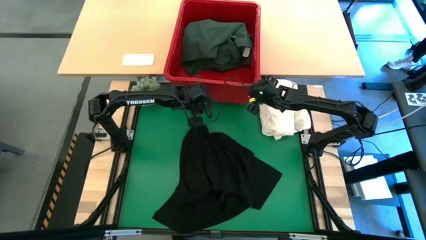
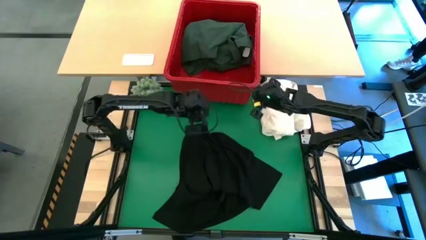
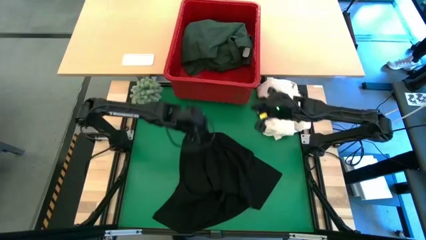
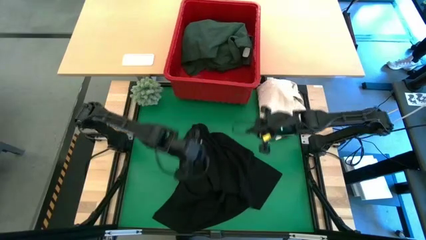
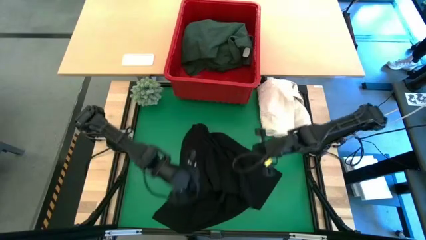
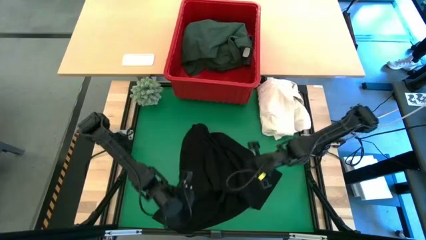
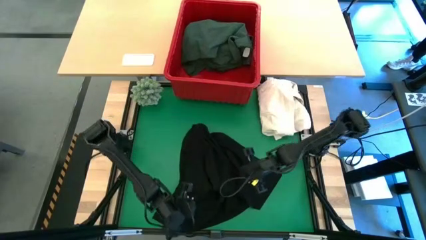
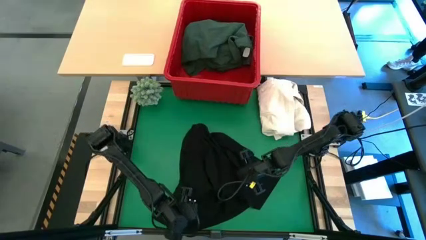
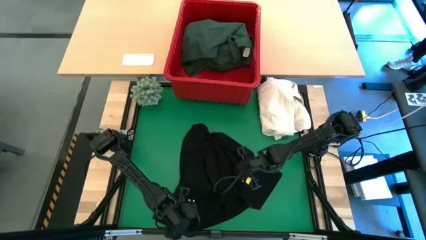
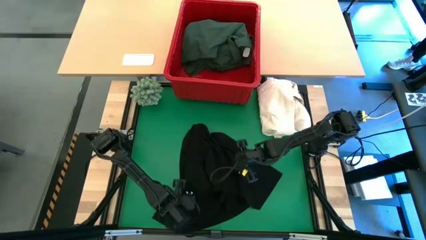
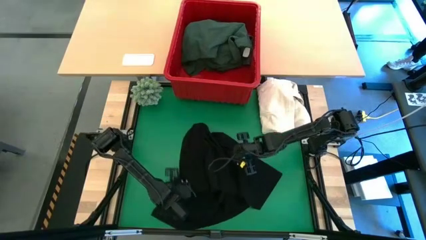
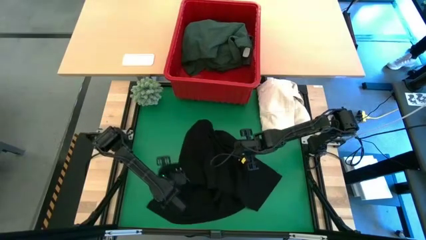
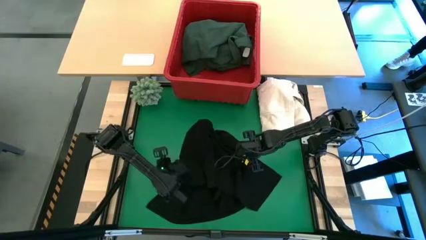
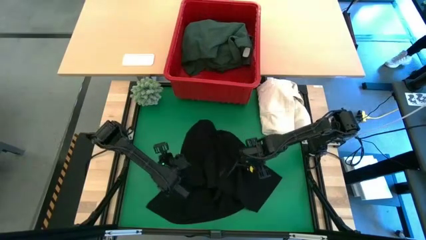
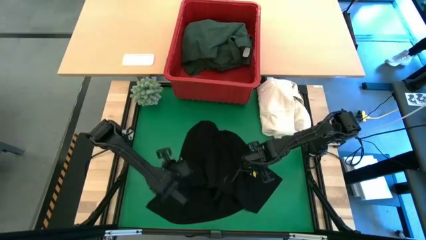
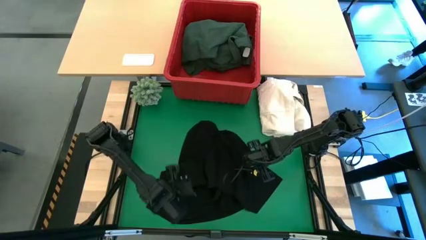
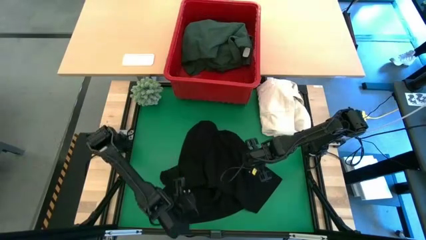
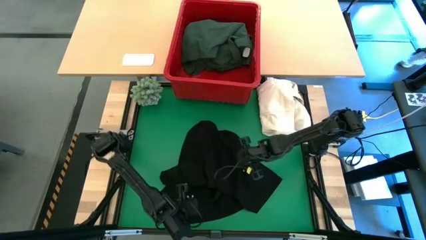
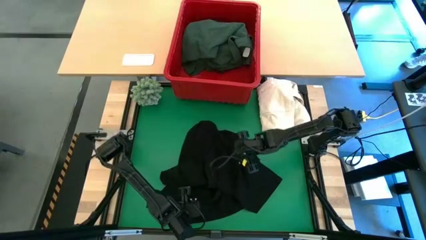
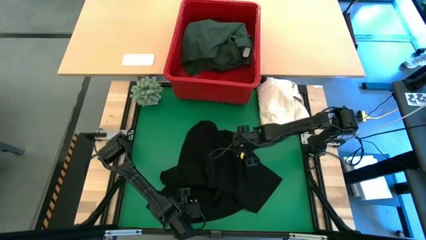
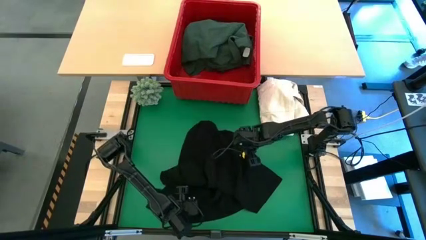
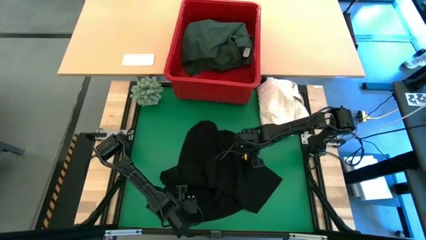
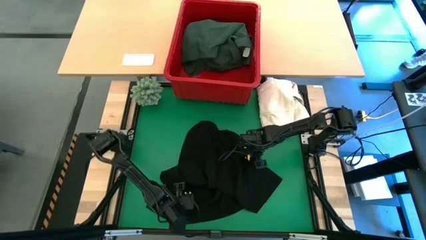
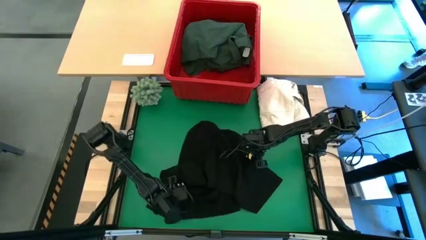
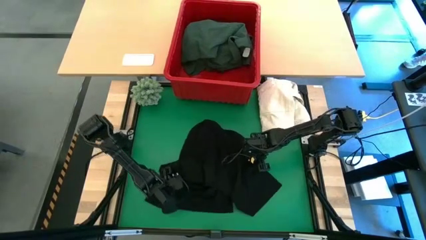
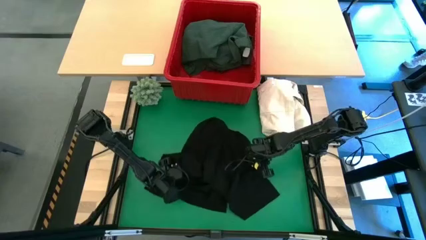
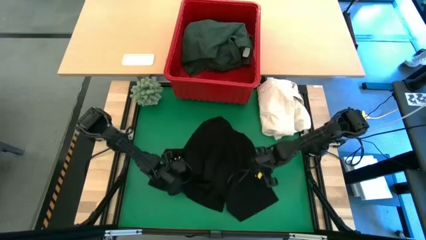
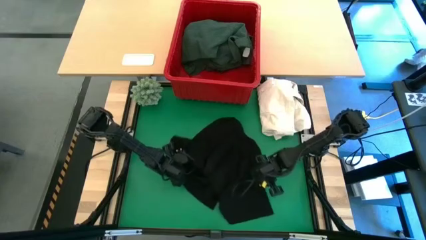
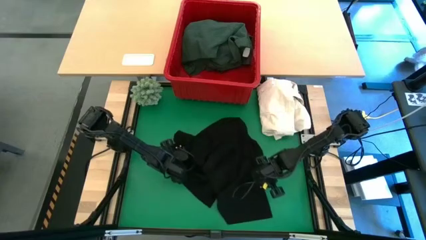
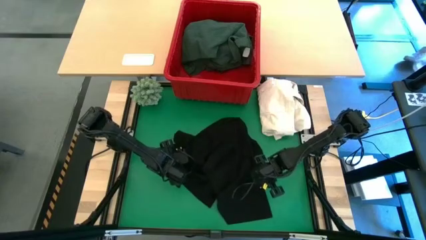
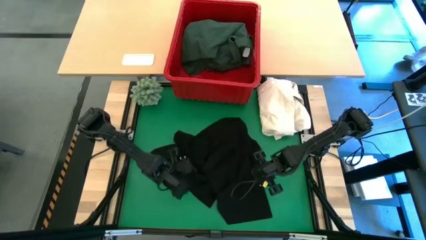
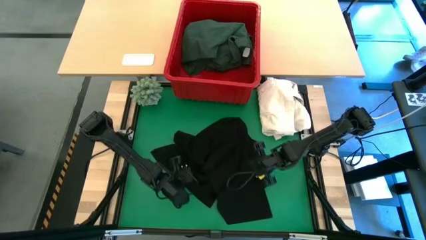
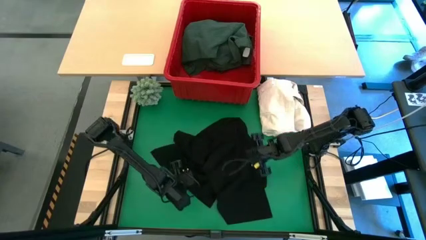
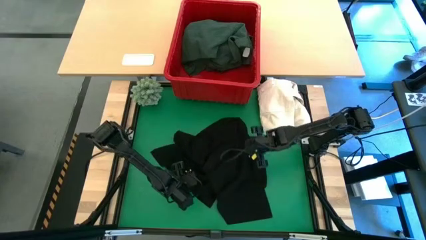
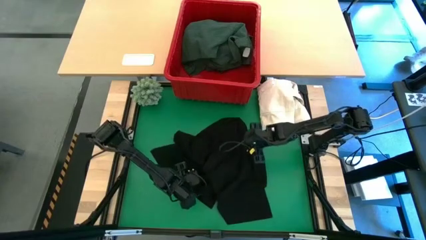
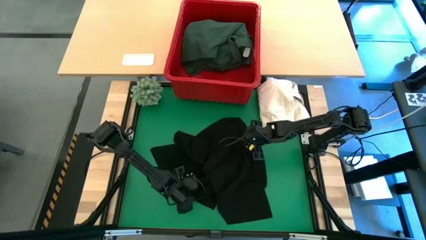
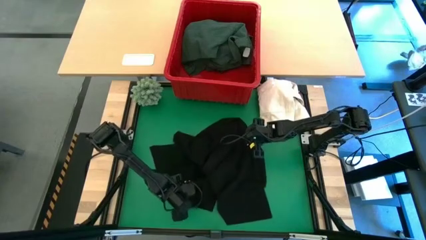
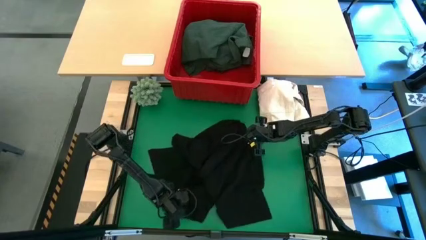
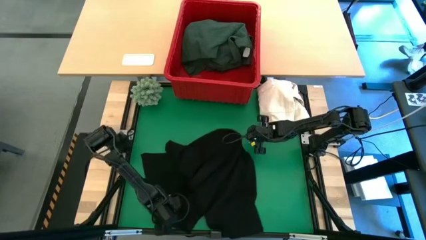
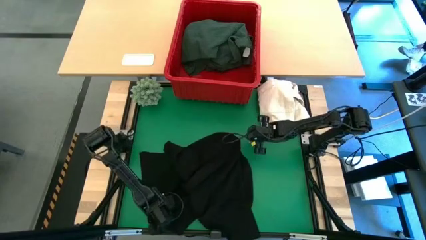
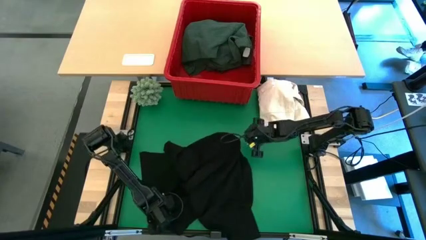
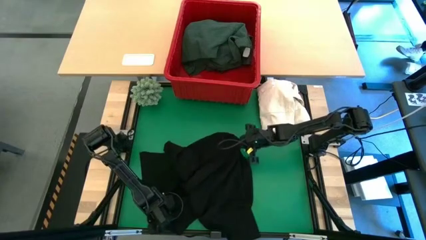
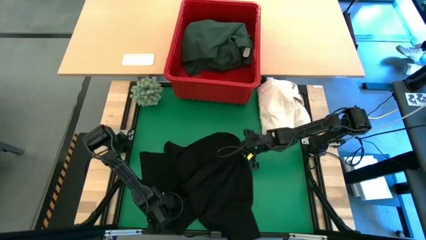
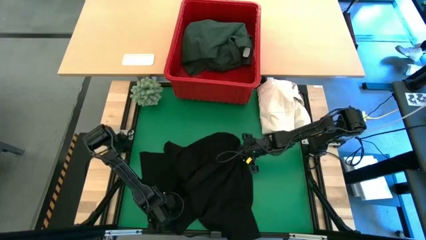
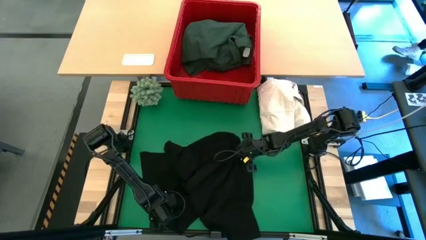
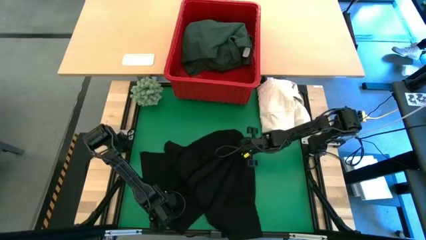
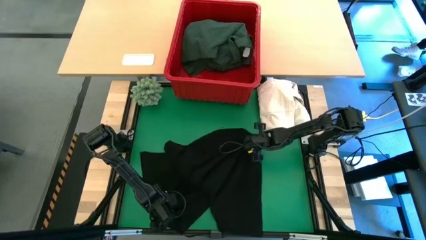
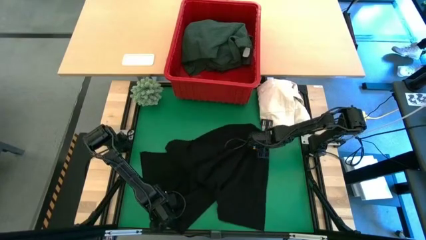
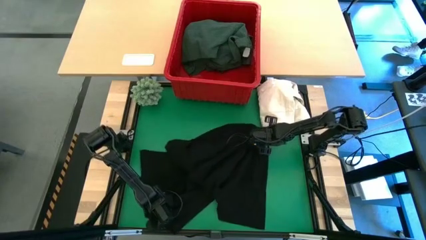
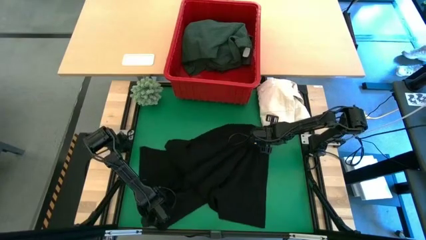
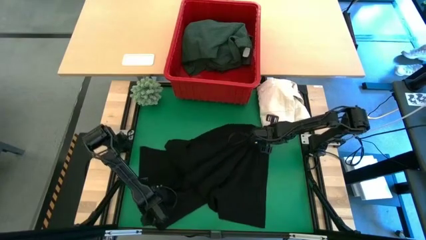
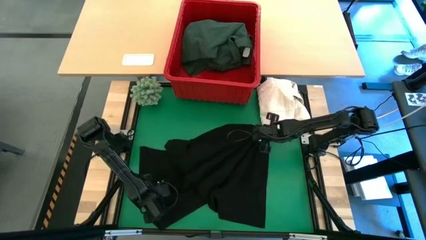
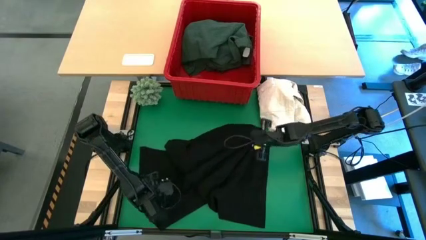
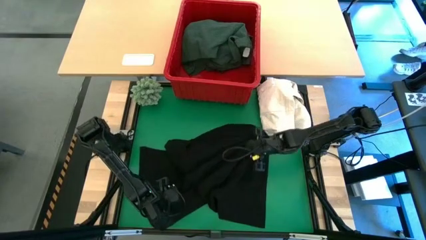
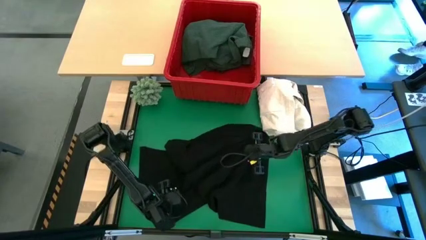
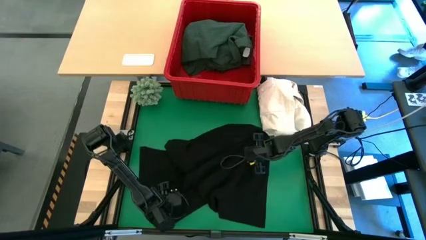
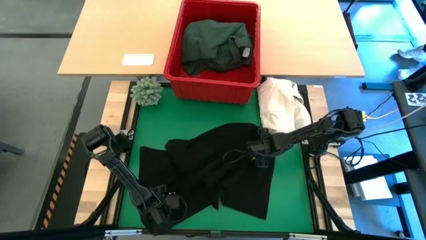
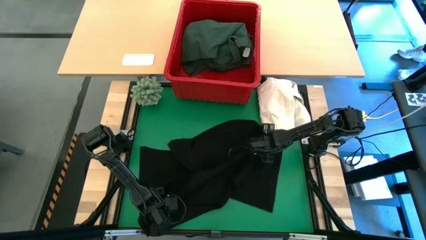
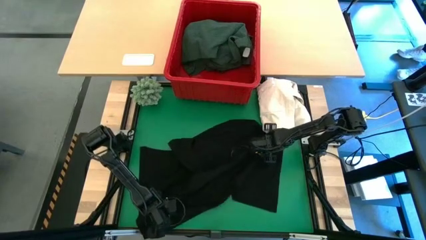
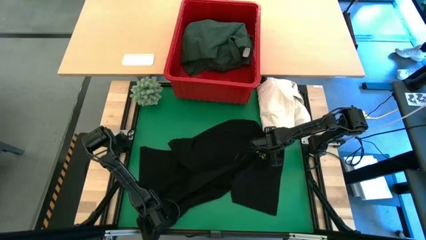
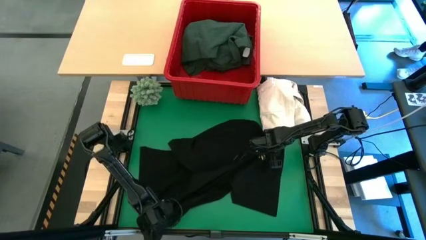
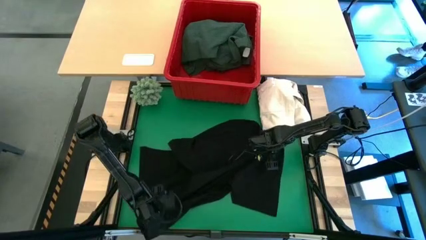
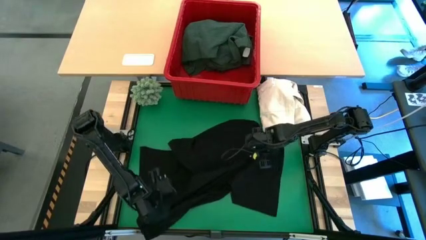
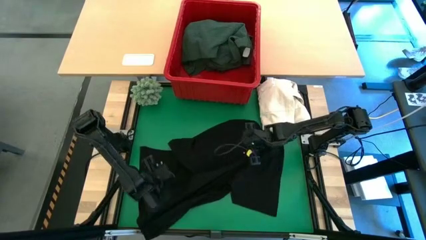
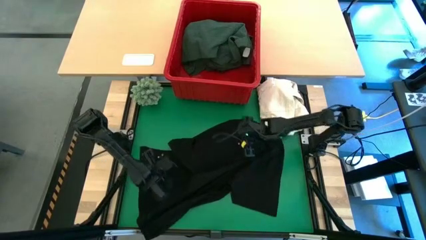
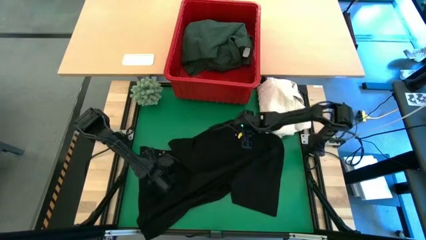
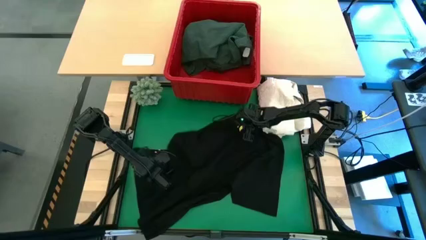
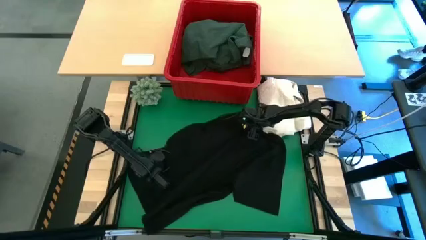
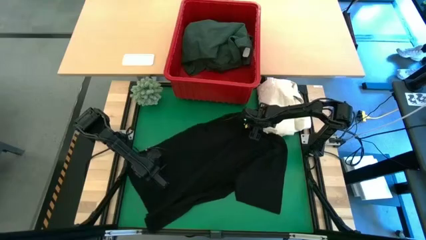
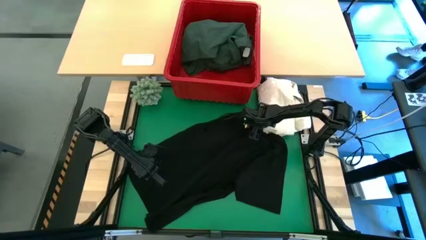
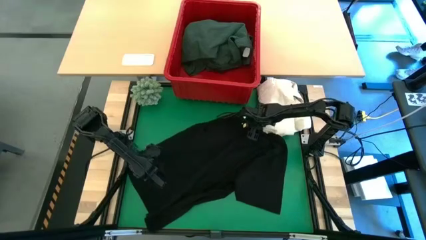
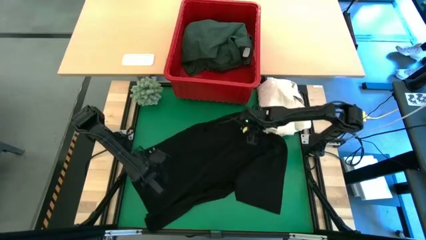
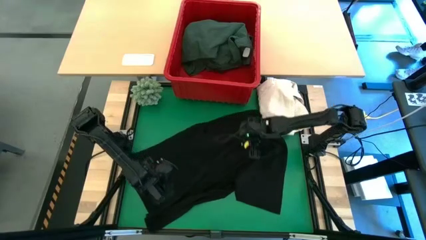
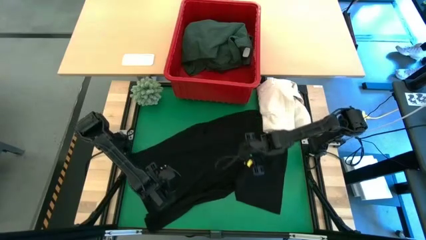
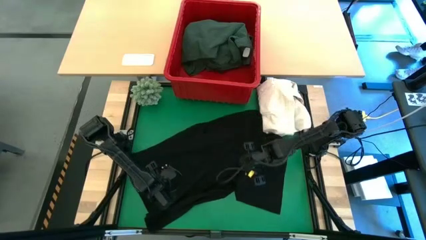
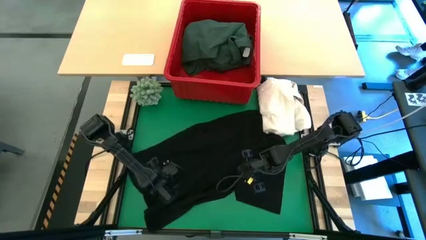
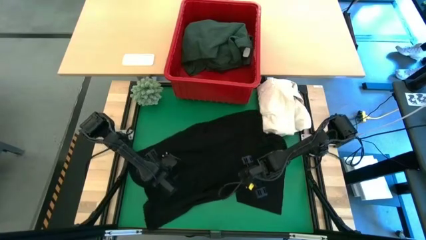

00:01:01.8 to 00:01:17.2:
Task: Fold laundry
Fold the black shirt

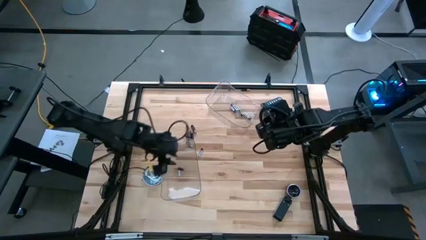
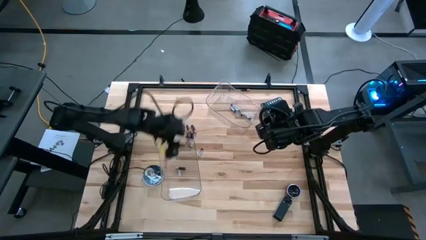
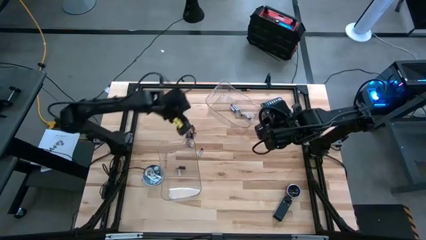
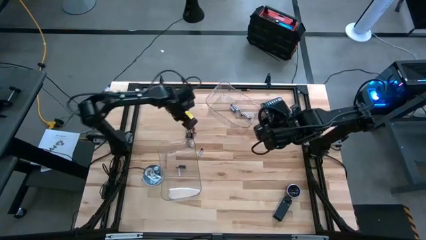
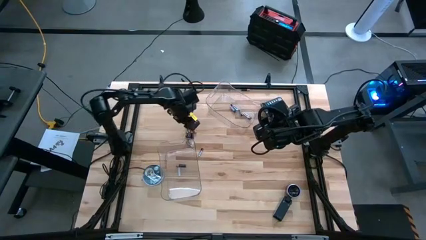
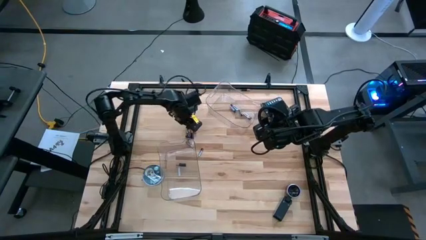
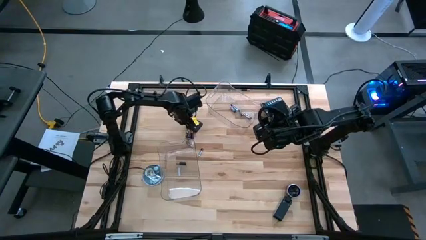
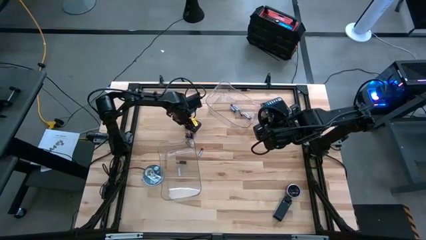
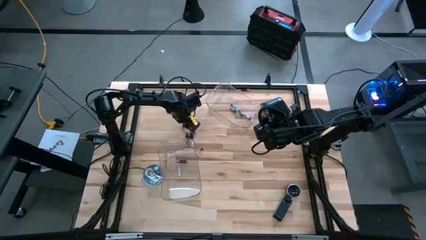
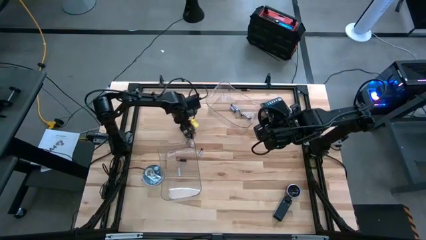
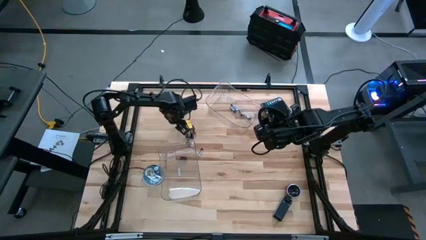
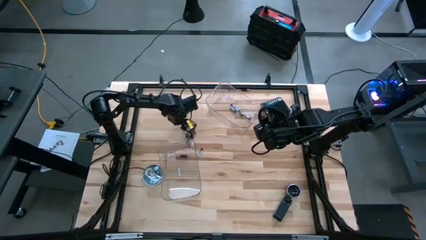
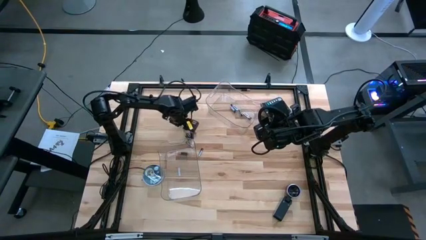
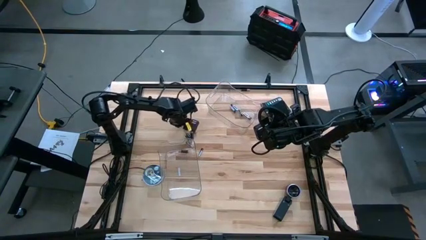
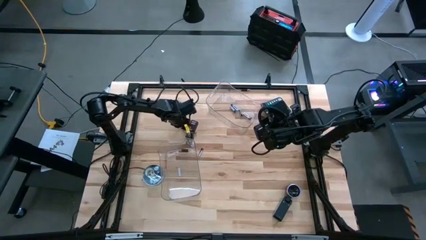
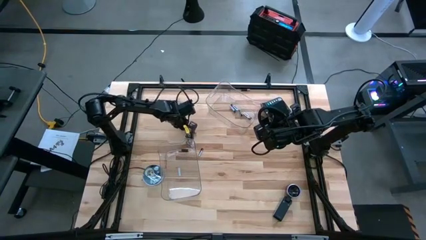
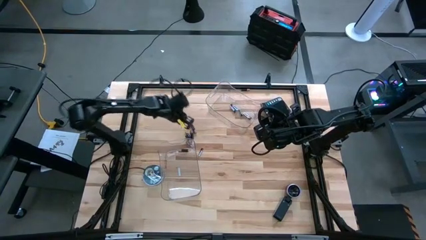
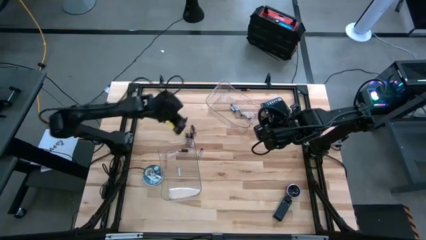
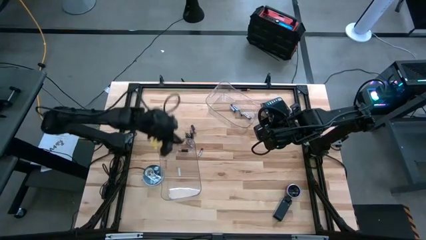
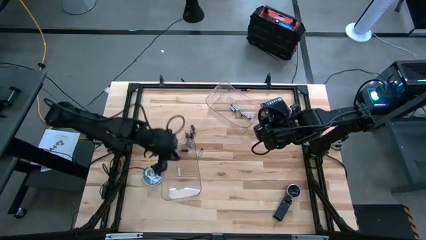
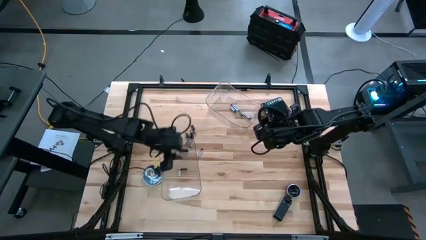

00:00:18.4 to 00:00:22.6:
Task: Sort batteries
Put the black battery into the bottom transparent bin
